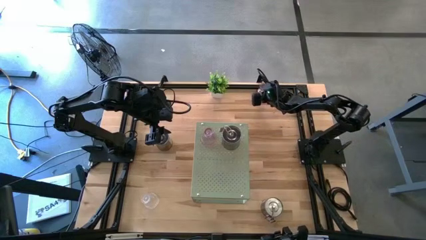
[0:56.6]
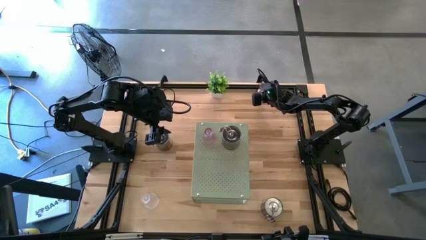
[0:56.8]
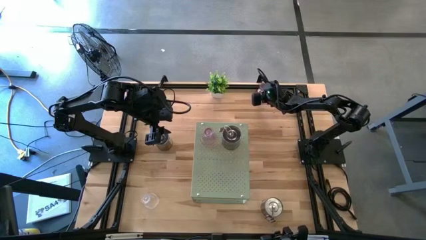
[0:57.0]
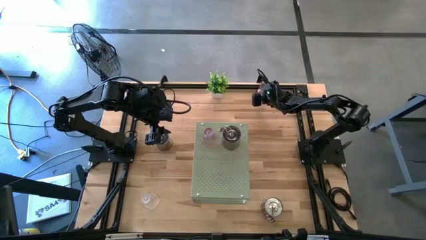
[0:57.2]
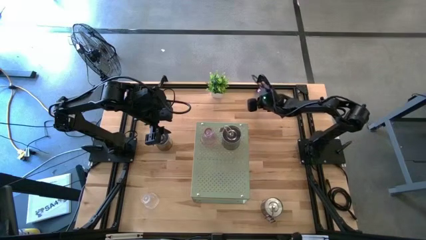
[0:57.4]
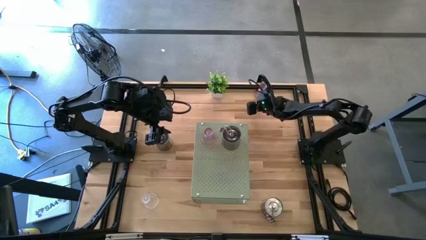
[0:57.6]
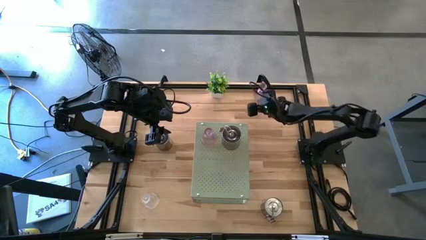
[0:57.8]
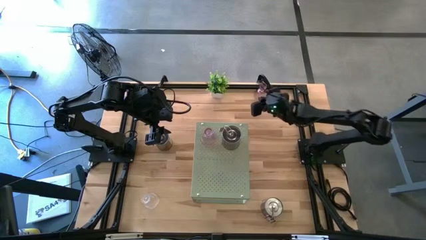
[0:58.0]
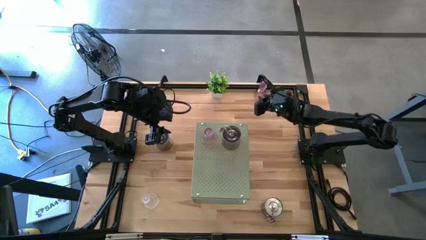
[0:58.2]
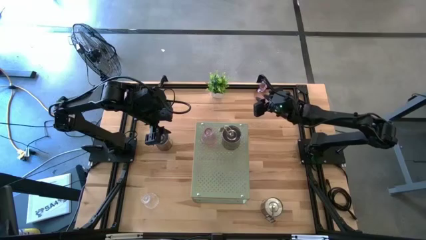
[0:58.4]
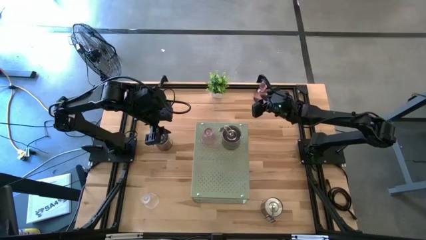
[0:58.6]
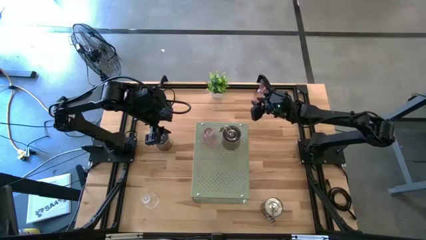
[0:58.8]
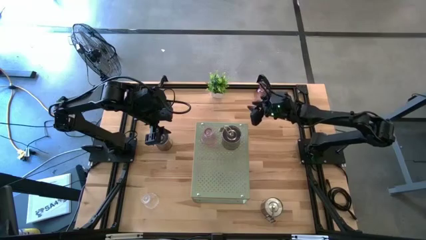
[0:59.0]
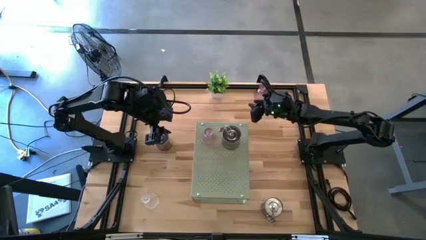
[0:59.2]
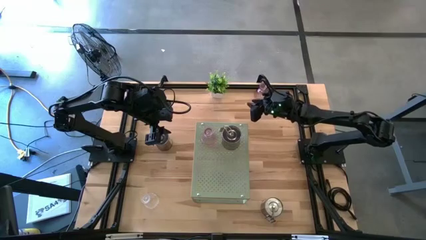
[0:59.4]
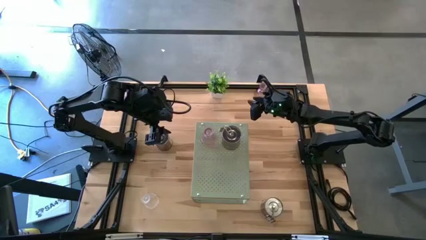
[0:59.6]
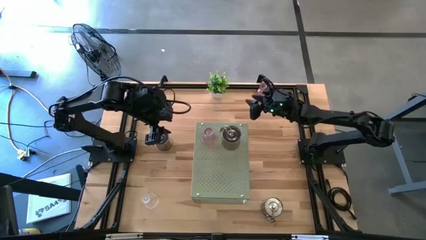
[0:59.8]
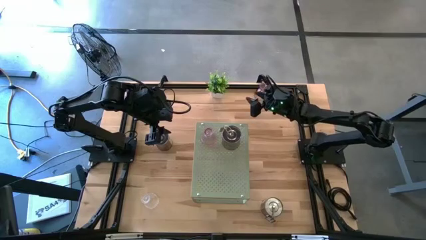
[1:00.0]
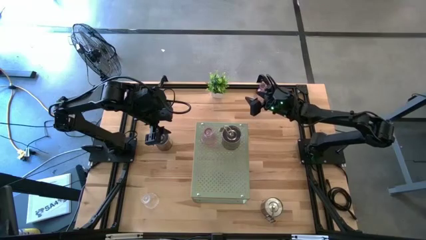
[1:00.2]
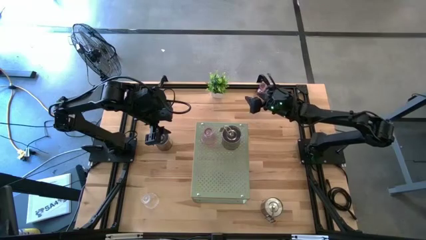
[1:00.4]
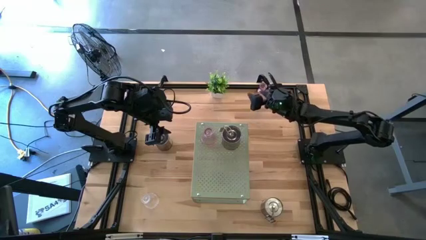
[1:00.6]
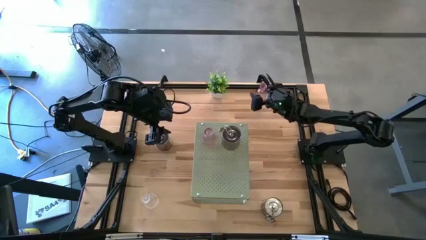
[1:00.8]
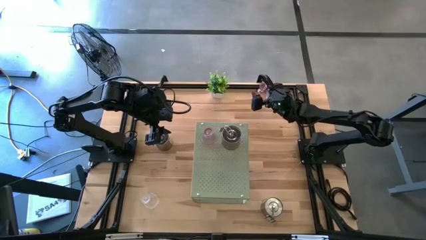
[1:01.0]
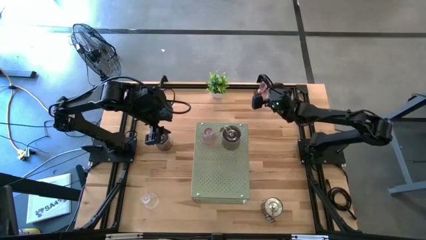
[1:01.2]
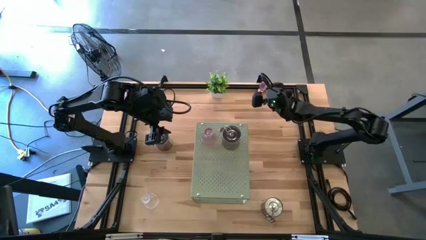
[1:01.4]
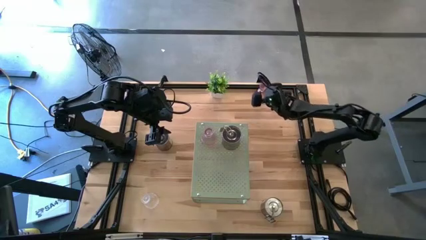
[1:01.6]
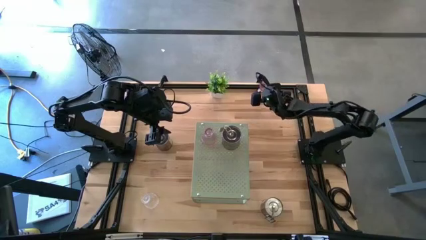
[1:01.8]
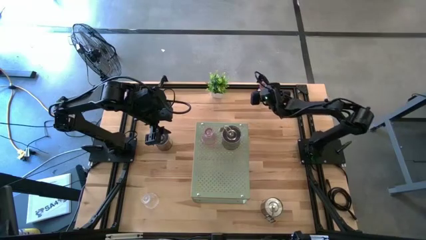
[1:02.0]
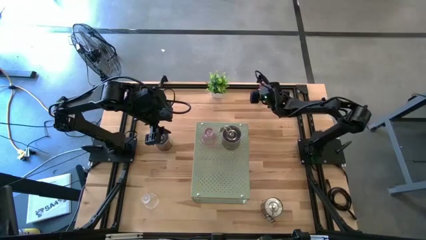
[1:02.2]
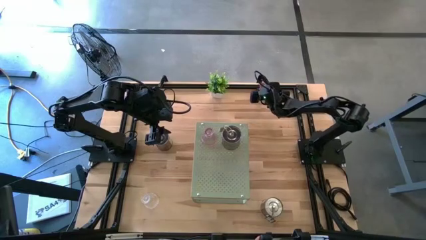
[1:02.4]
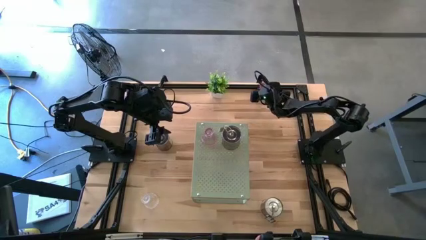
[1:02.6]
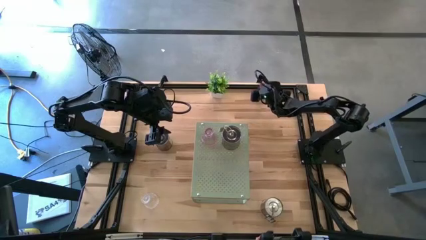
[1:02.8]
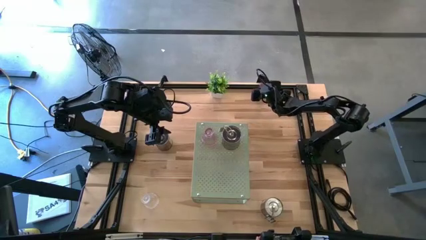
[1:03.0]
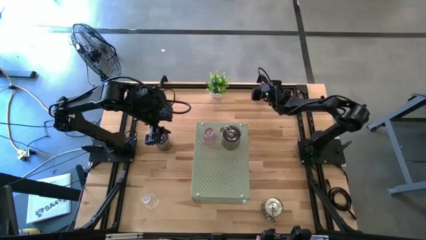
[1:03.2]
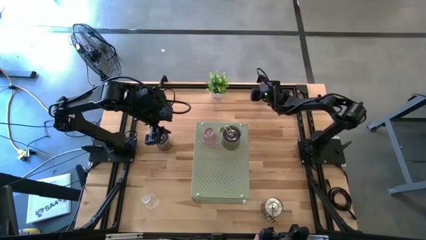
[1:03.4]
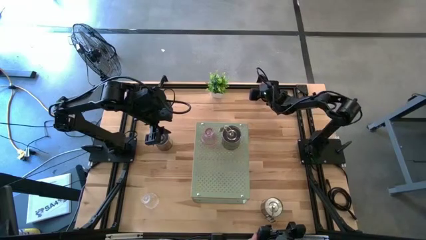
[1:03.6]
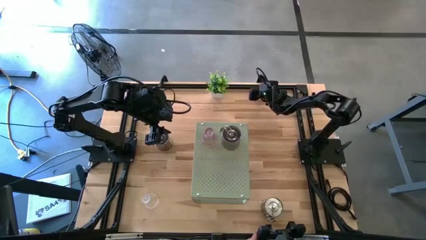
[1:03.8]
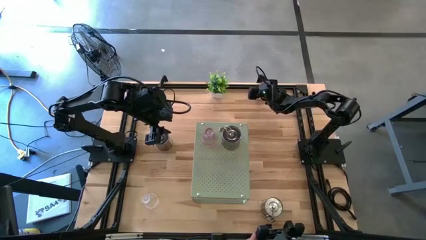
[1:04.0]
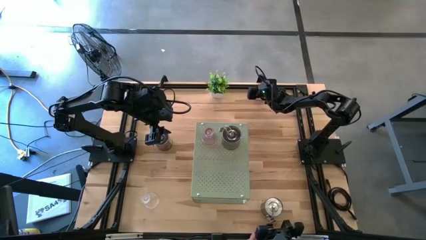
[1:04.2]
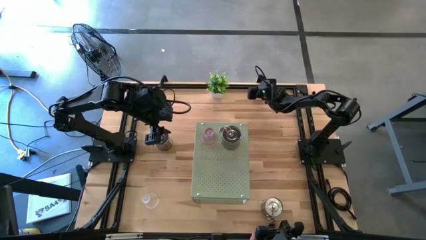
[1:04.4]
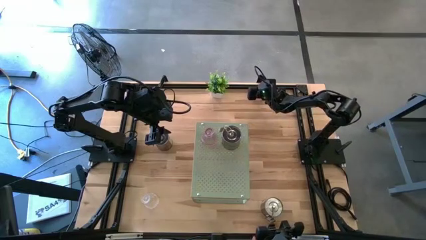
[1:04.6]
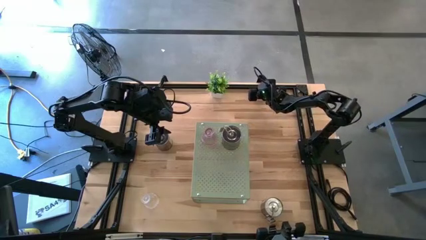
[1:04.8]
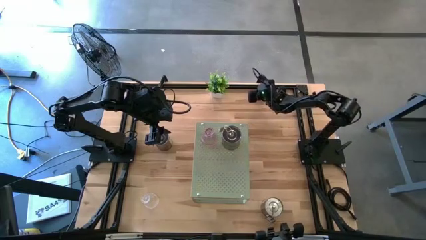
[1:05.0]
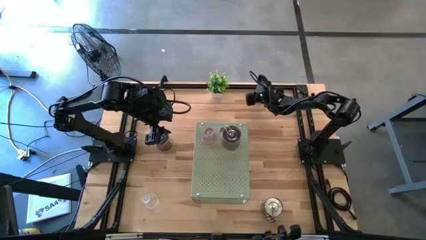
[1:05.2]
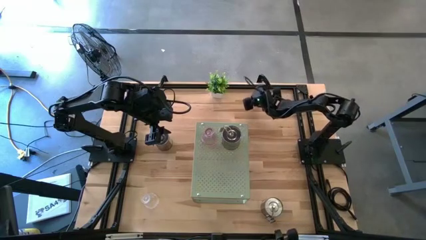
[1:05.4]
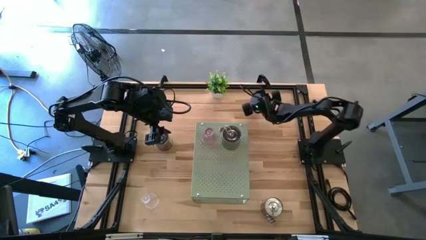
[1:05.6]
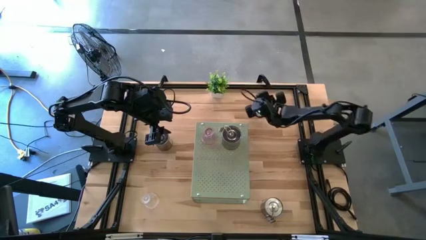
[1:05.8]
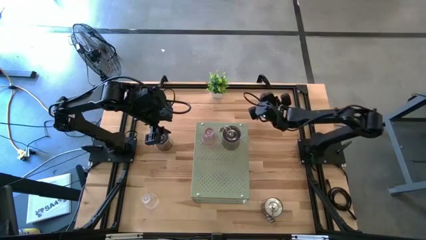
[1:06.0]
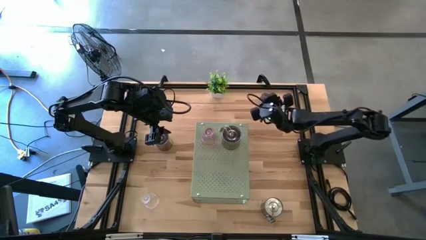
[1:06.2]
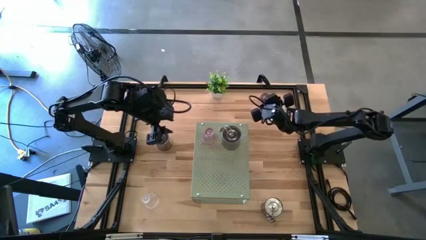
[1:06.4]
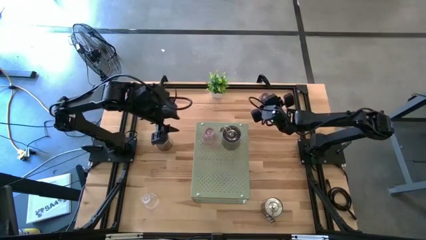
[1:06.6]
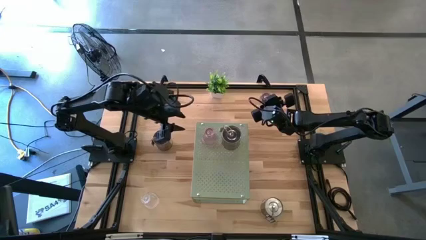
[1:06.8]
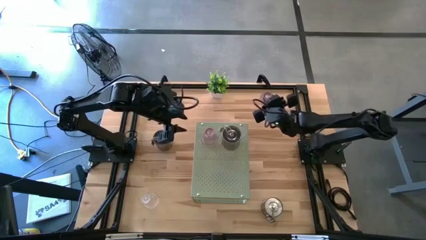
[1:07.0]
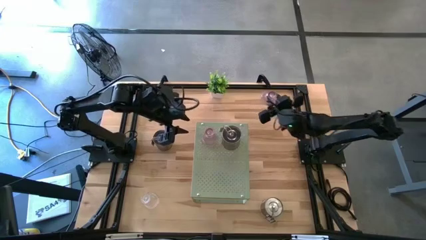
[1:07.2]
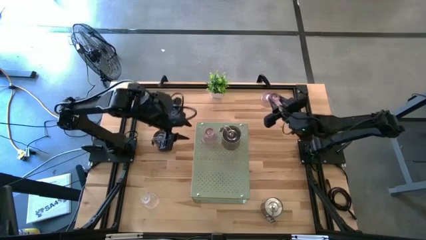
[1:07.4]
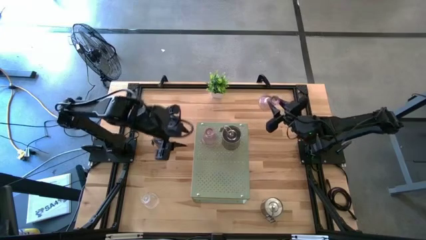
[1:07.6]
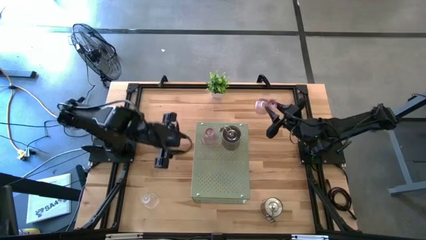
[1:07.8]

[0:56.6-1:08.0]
Task: Pick & Place candle stick holders
Put the pink transparent candle holder on the shelf
